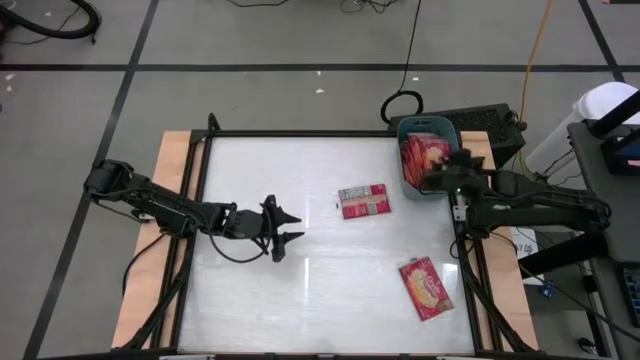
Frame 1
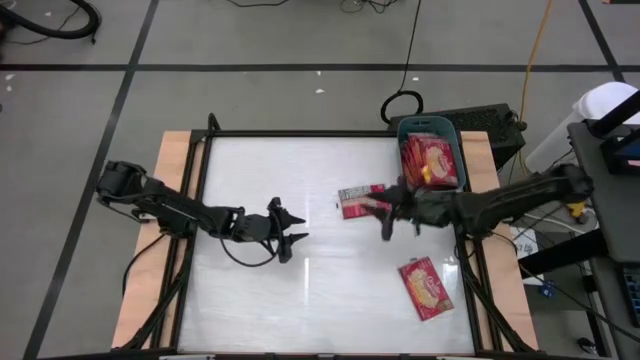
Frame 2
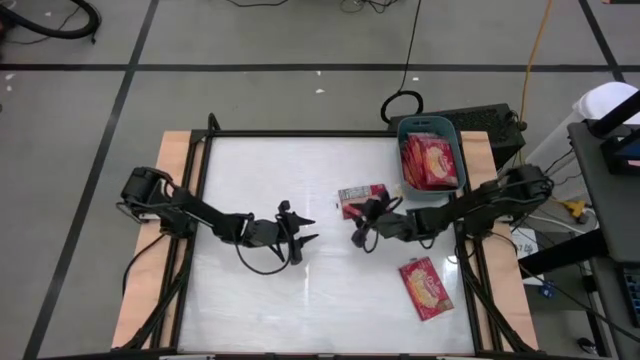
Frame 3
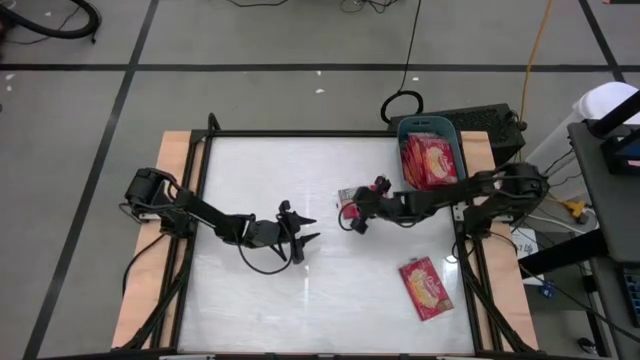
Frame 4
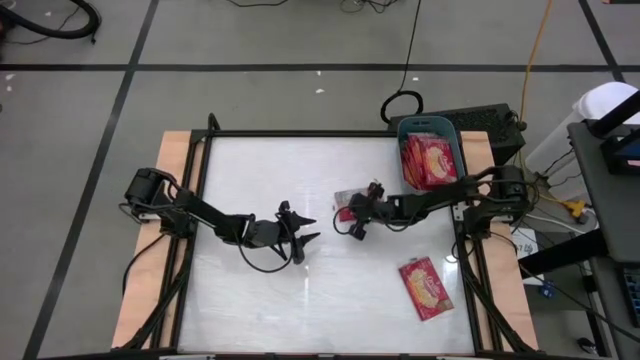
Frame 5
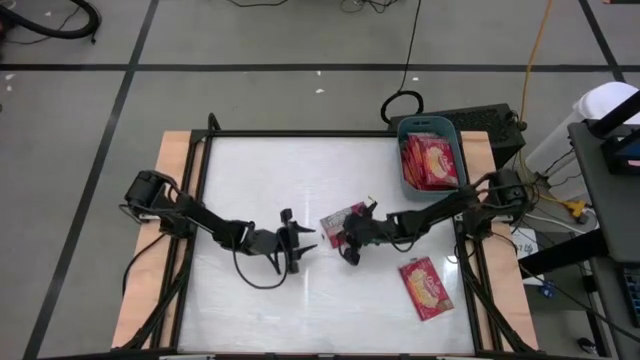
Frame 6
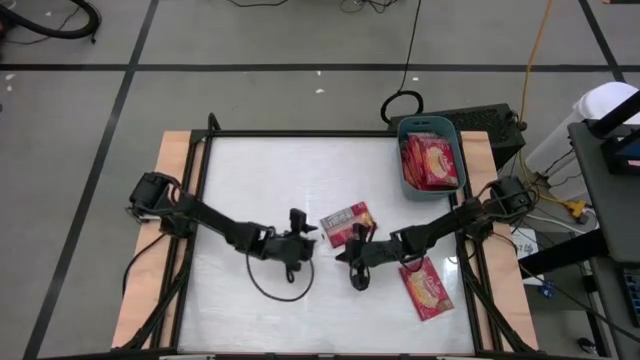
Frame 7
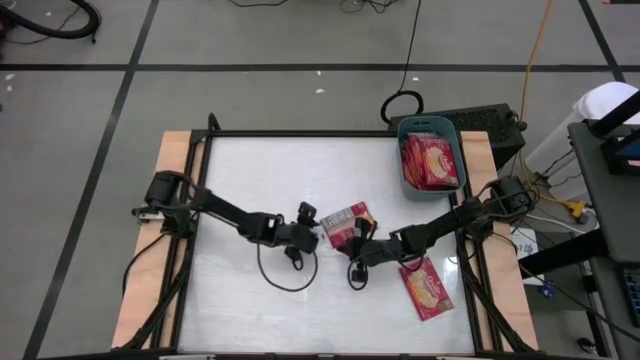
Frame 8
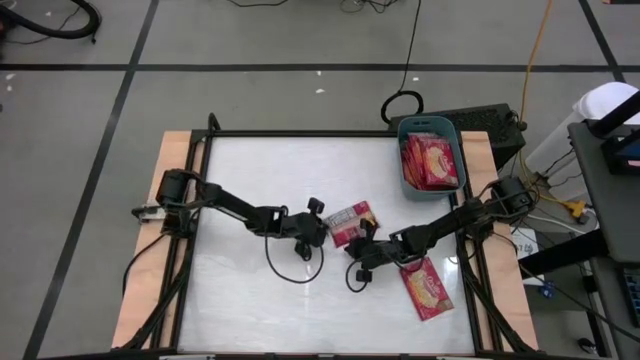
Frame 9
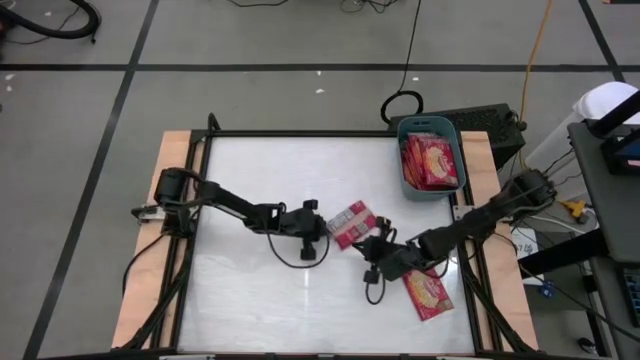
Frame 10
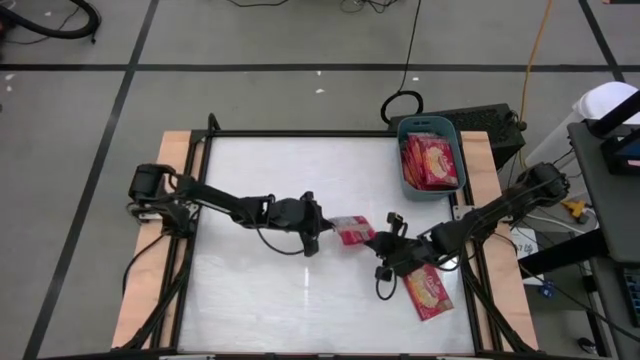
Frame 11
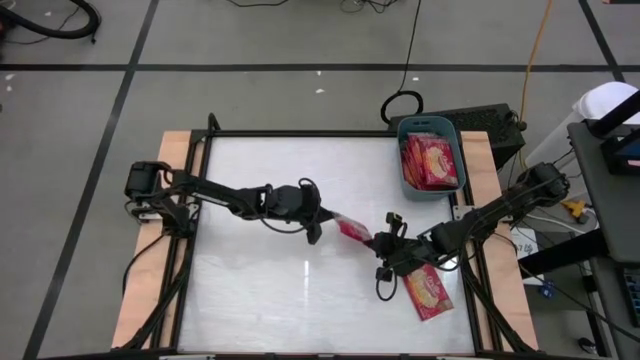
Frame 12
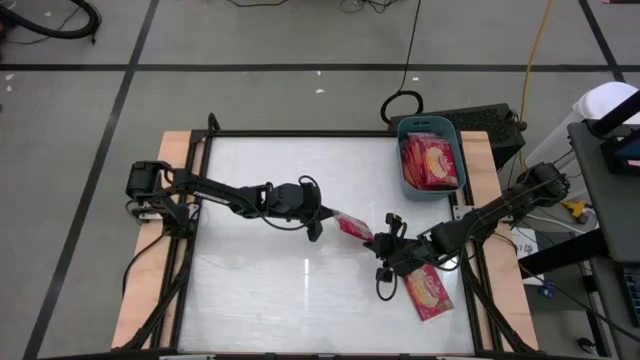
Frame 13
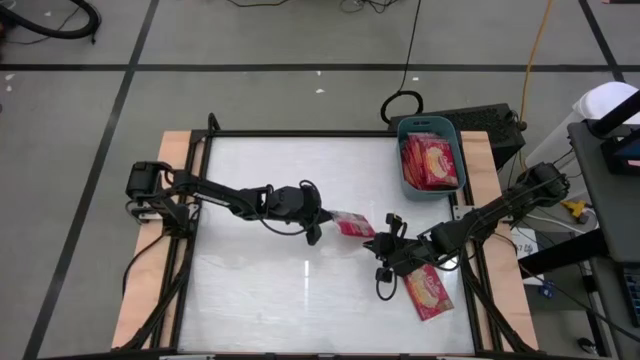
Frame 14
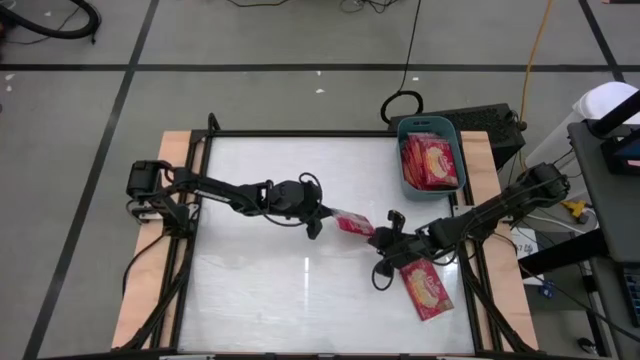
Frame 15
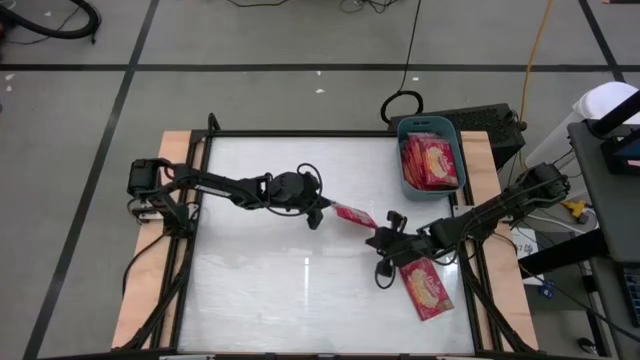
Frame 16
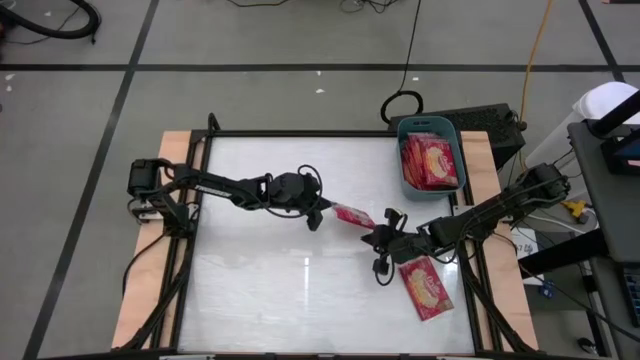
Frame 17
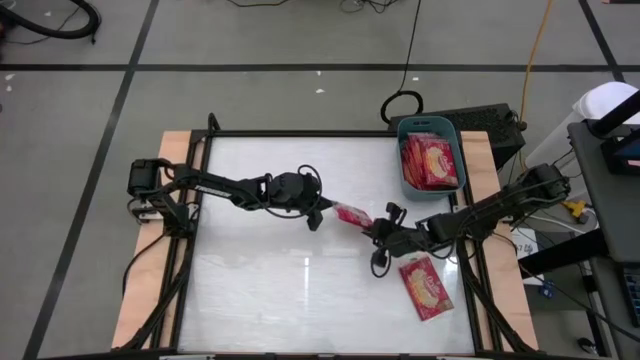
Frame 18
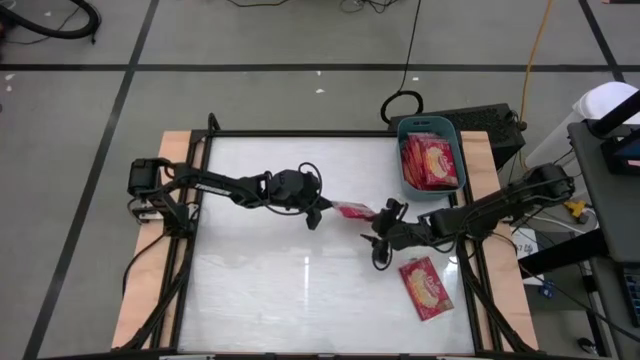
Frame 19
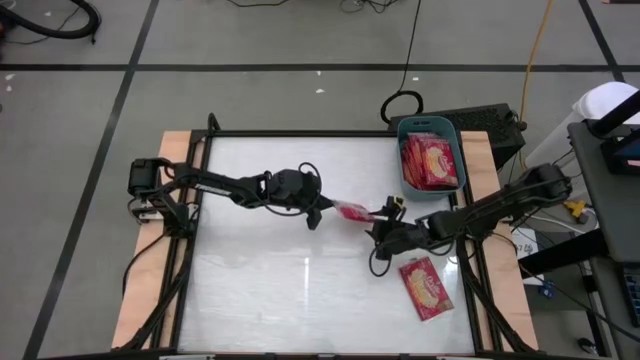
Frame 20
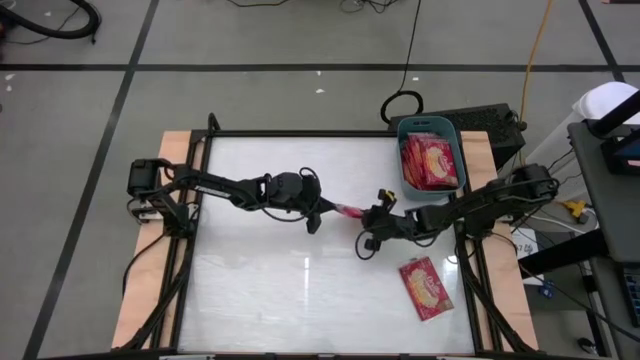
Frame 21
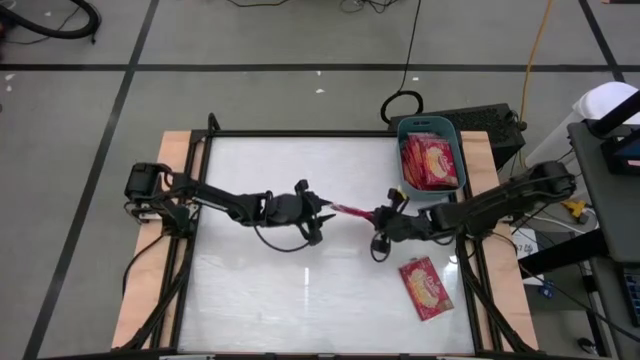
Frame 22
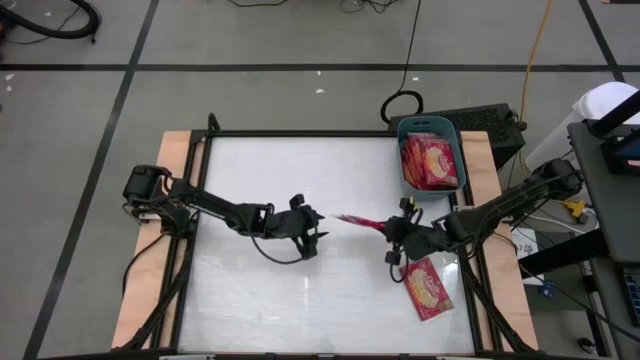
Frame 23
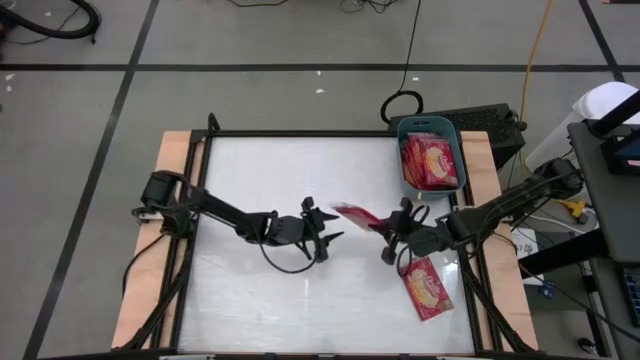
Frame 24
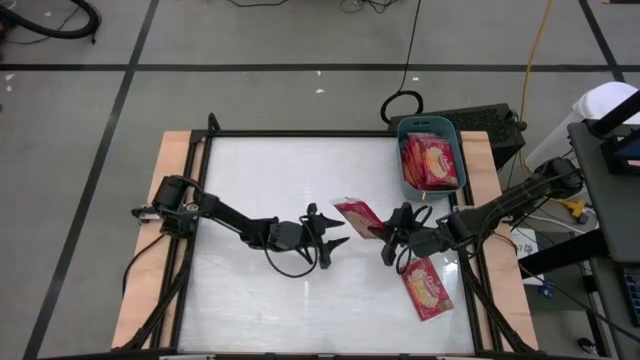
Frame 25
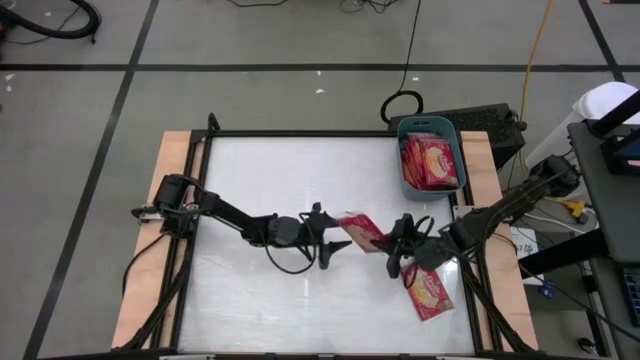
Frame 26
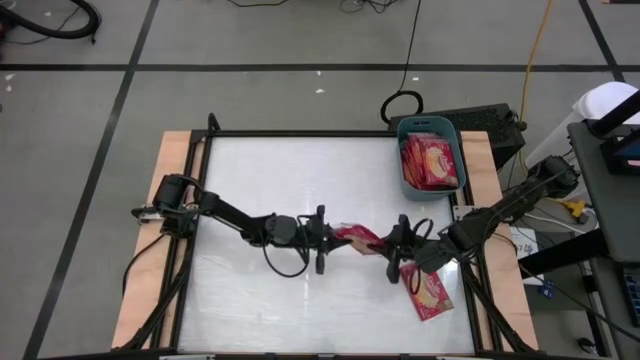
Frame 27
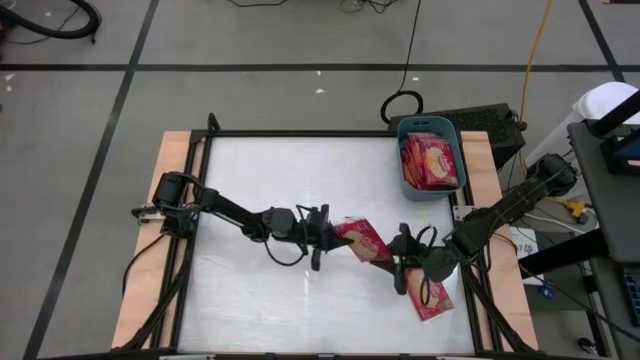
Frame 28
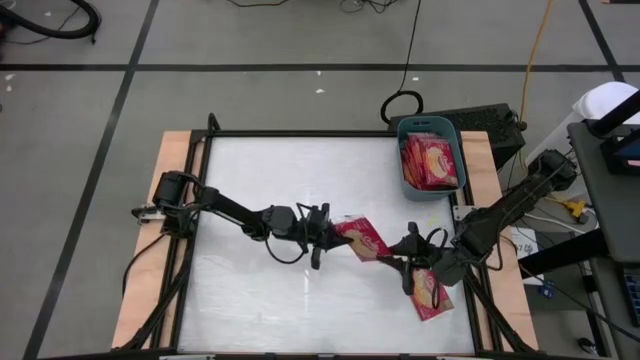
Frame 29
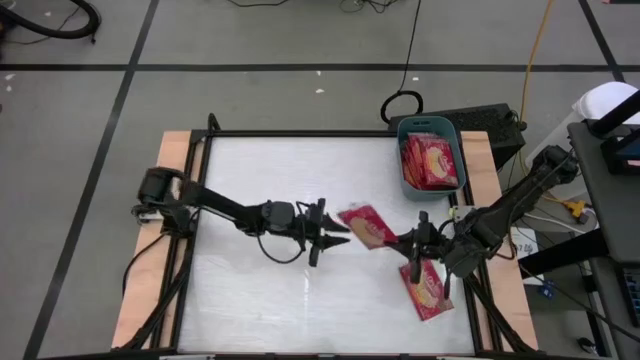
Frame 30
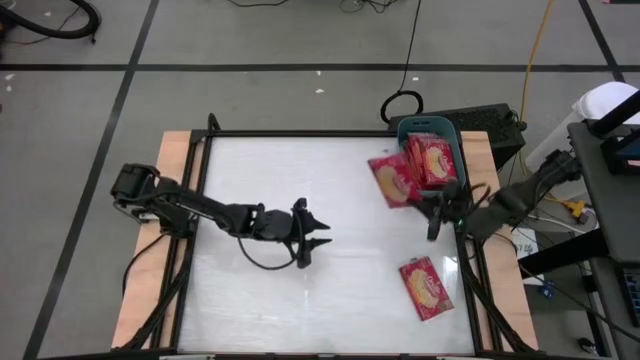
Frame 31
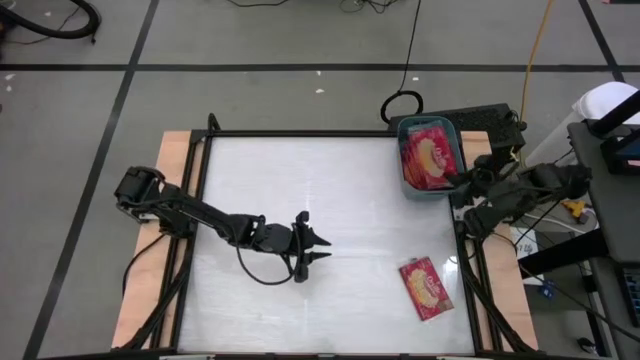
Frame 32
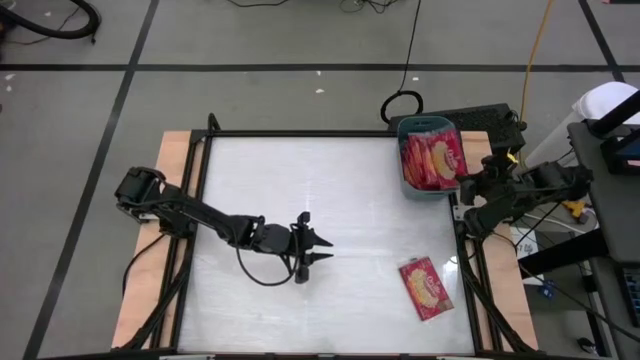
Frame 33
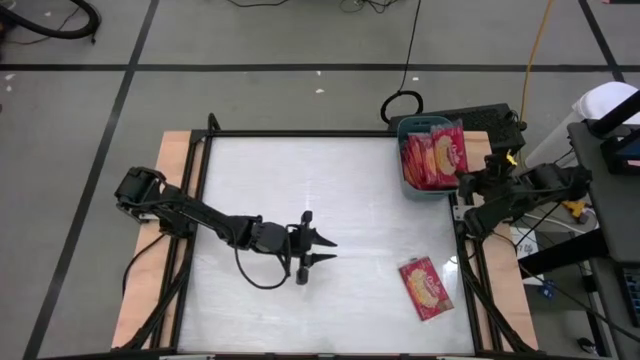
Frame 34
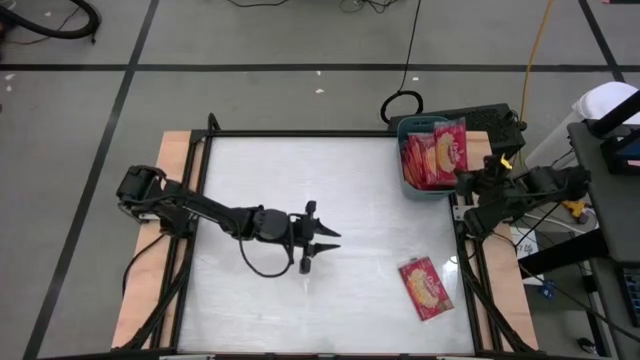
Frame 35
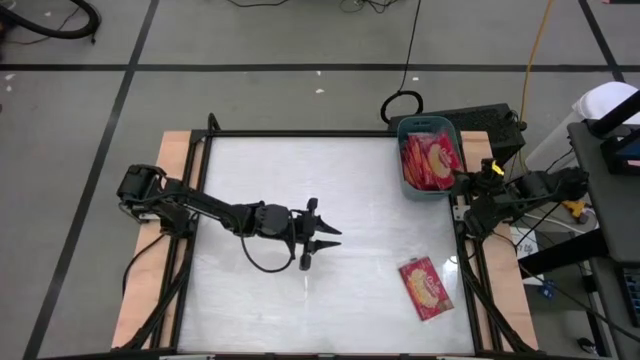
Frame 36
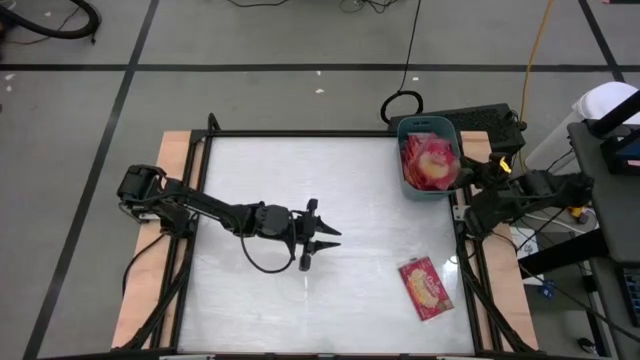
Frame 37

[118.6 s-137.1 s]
Task: Sort popcorn bags into baskets
Put the red popcorn bag into the blue bin
